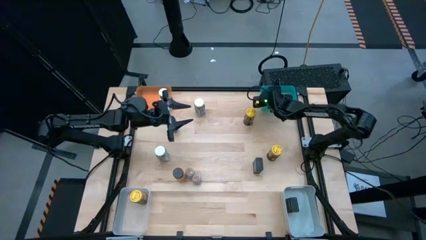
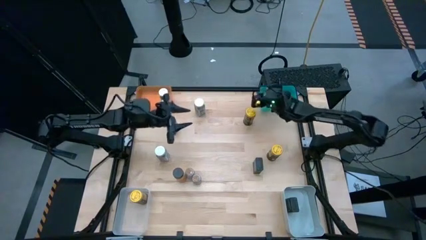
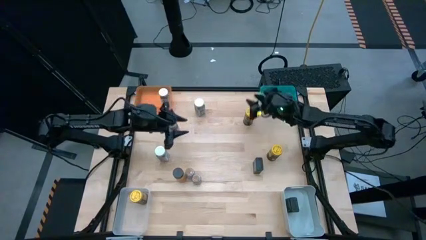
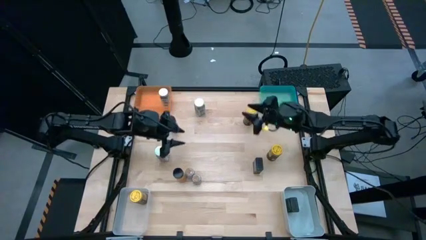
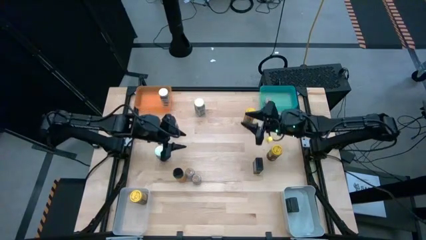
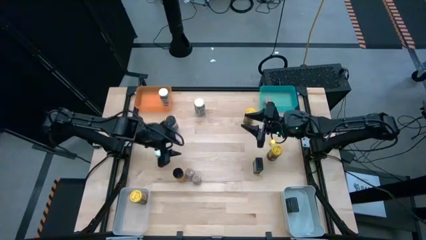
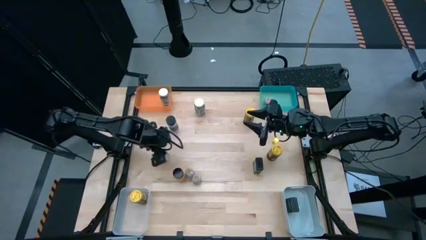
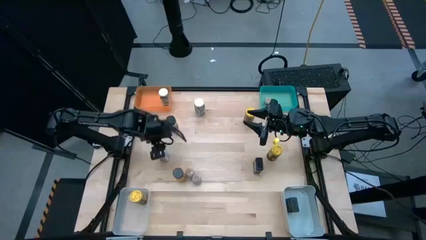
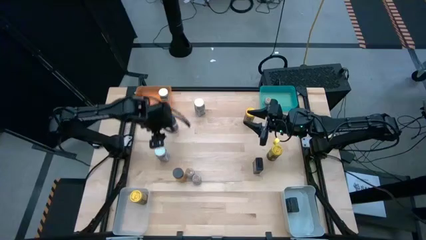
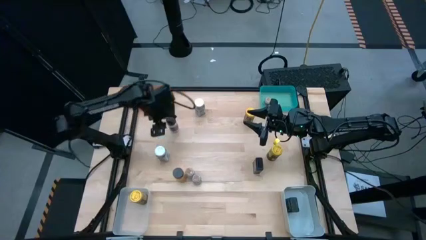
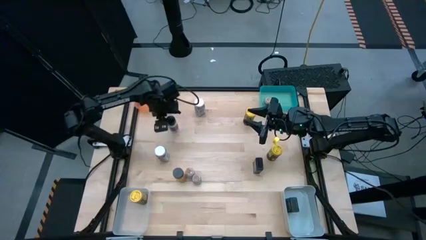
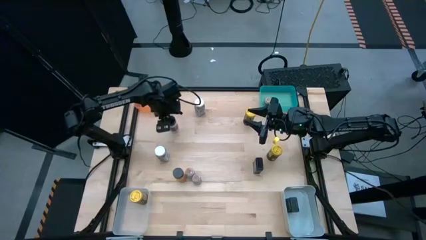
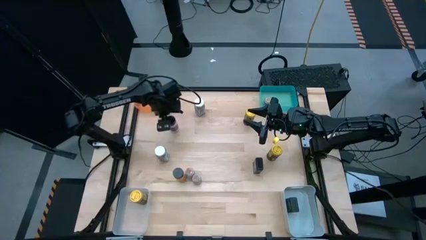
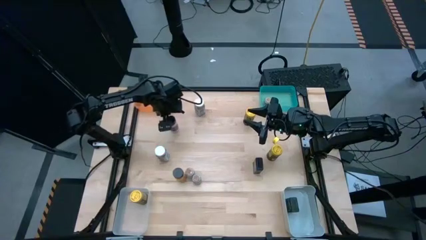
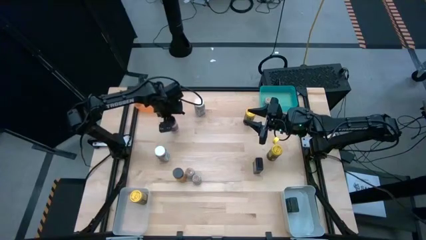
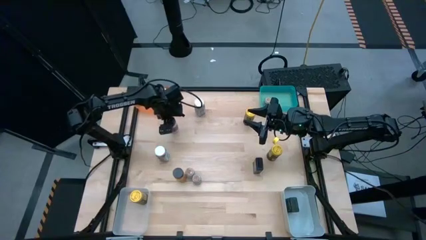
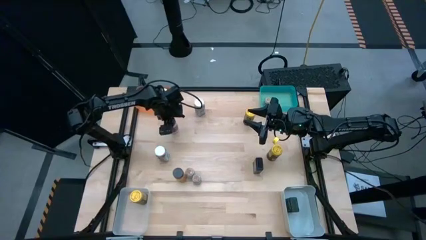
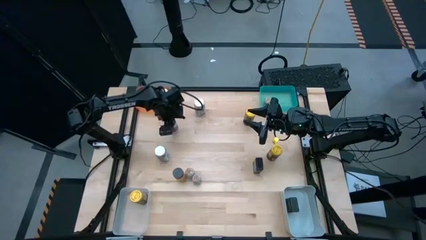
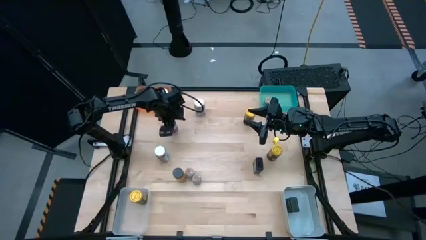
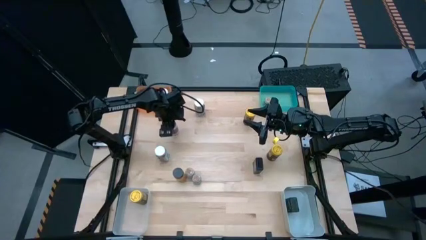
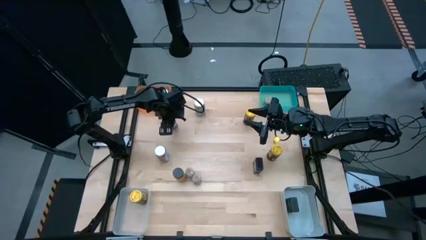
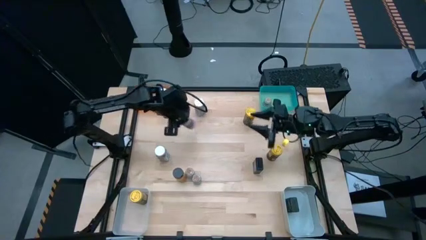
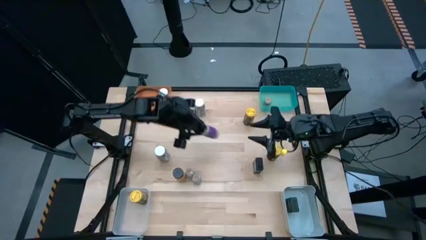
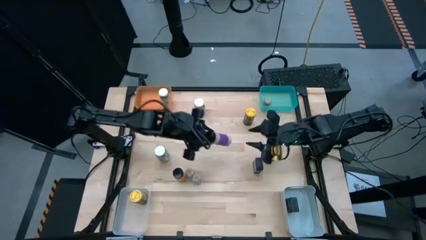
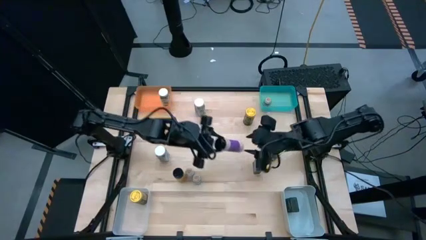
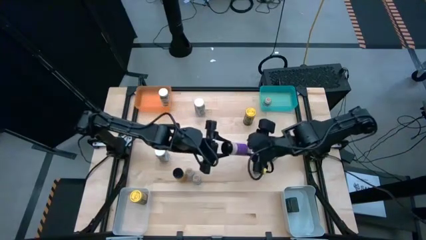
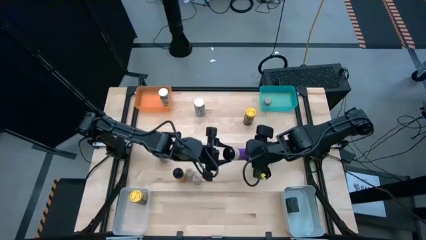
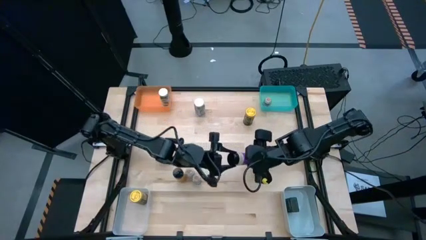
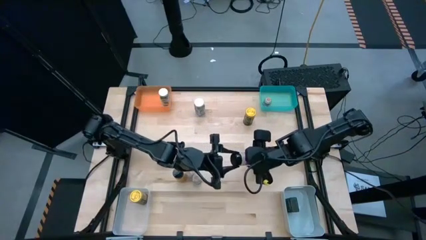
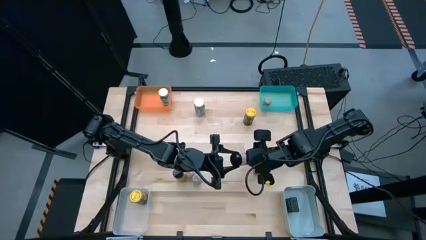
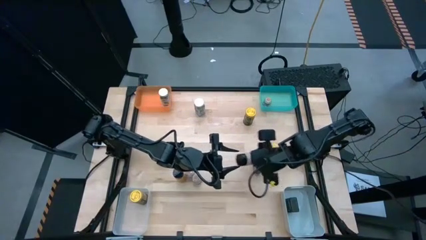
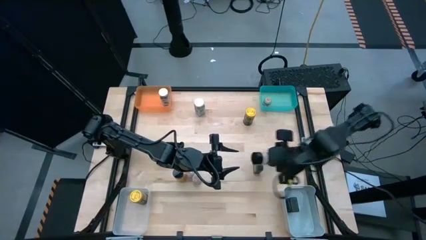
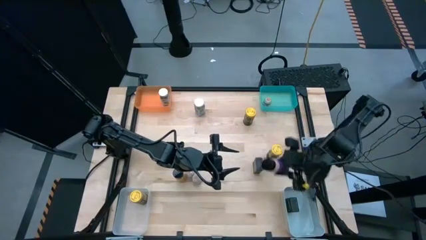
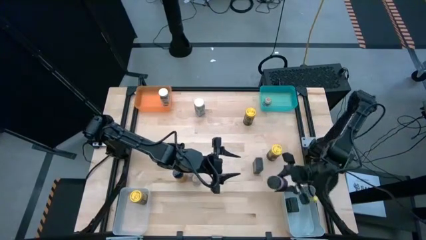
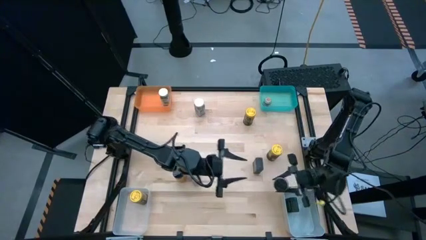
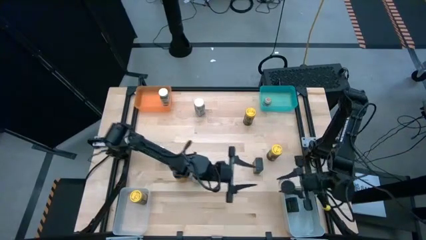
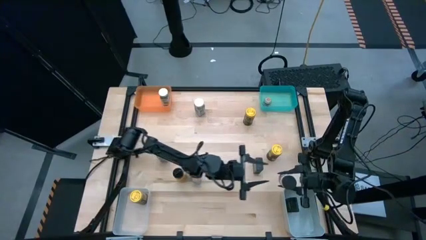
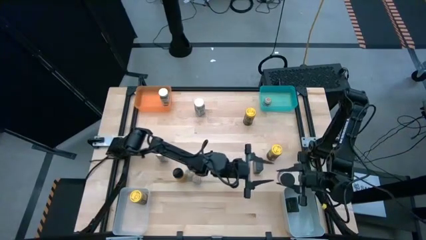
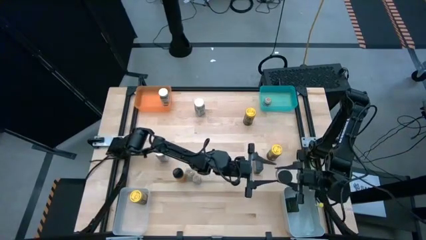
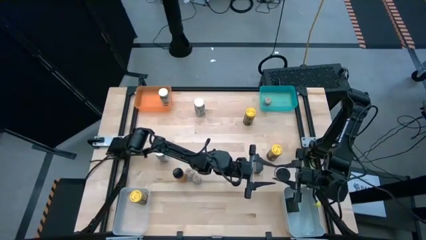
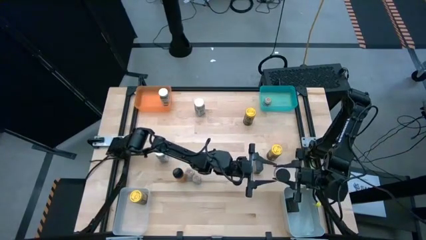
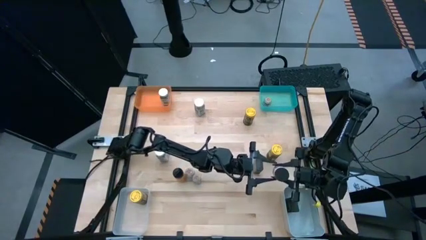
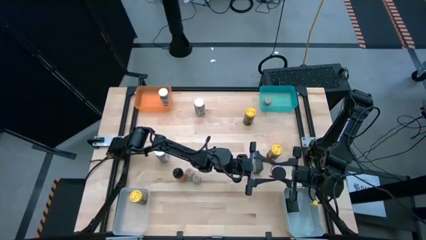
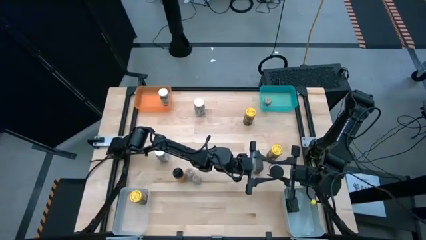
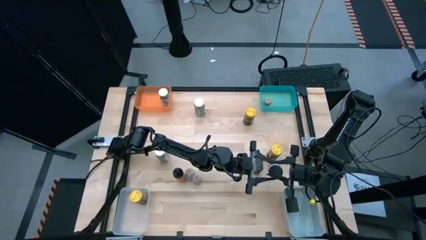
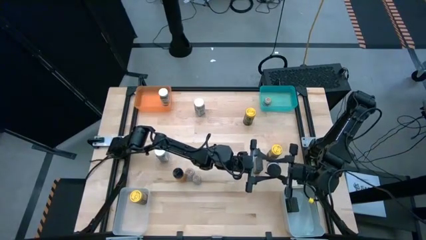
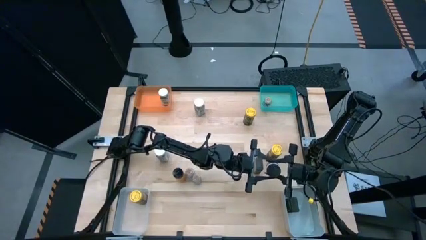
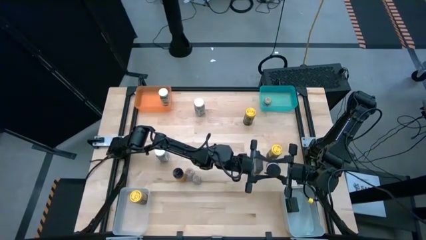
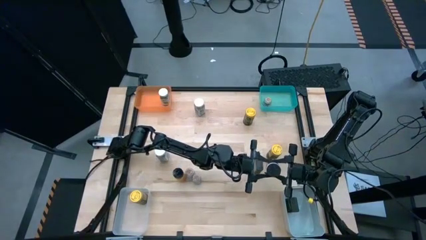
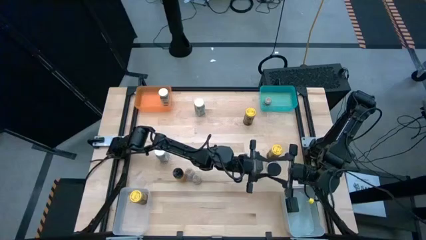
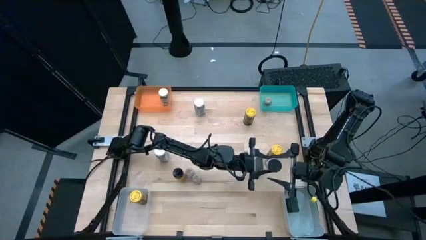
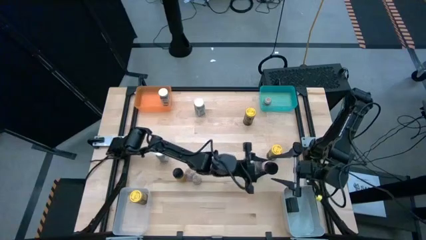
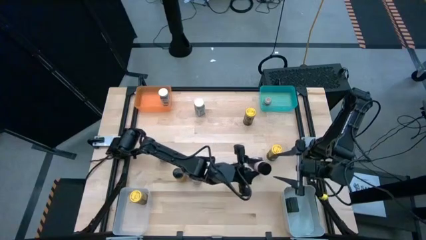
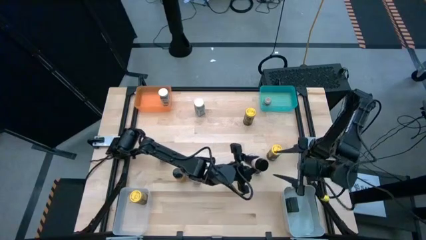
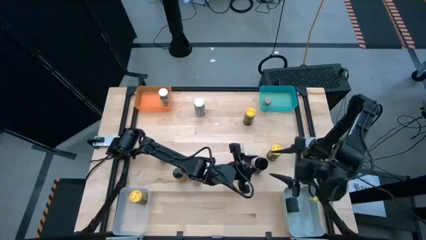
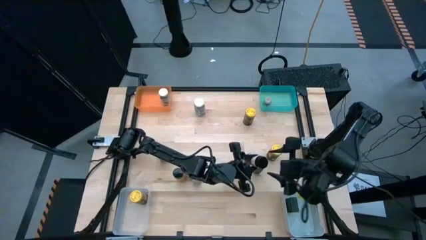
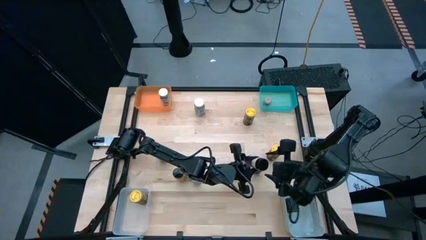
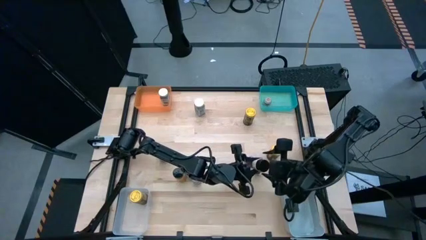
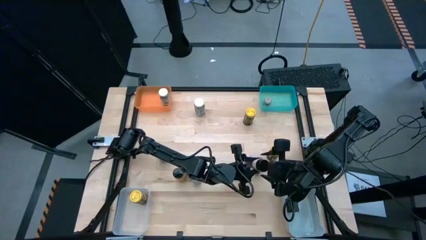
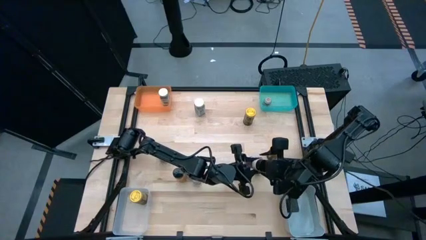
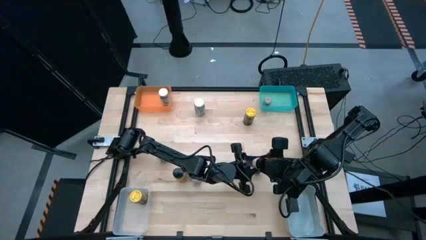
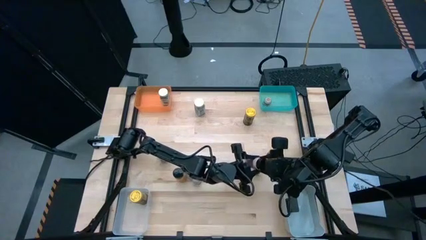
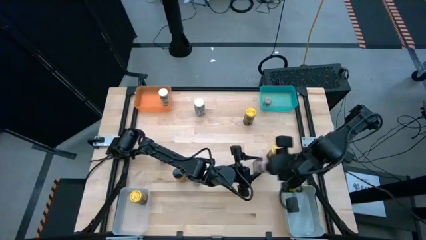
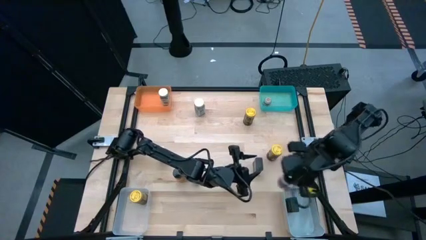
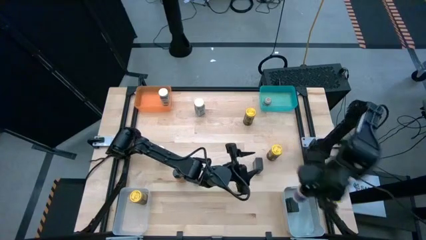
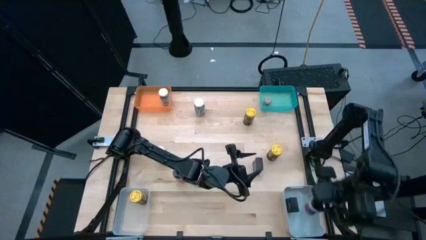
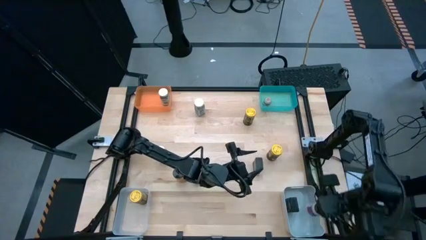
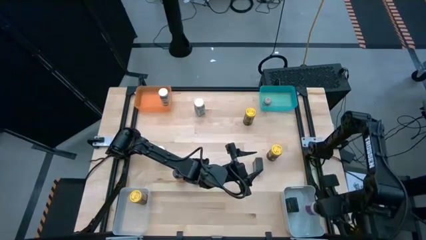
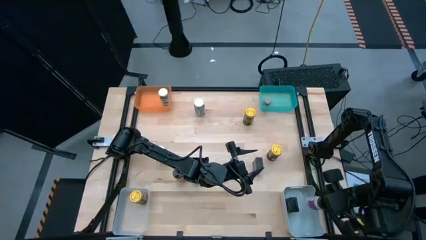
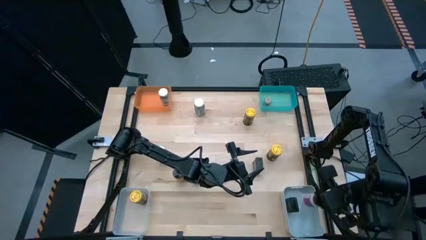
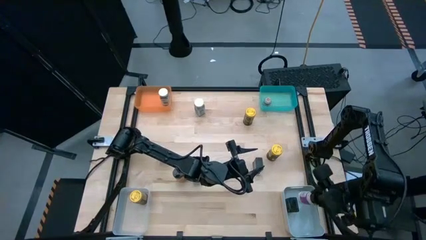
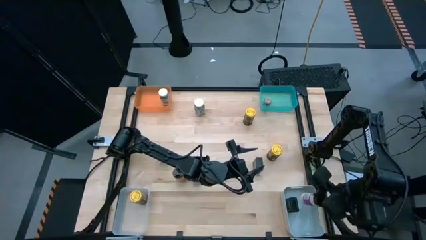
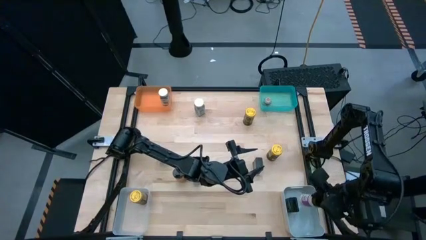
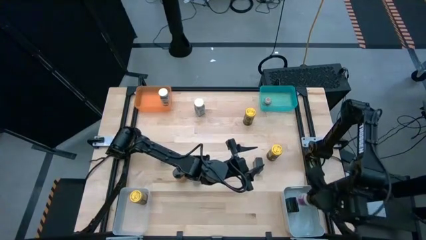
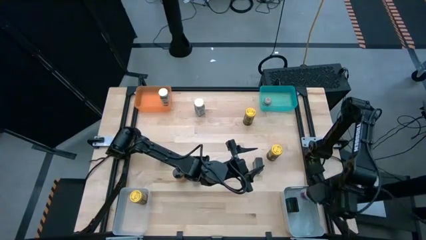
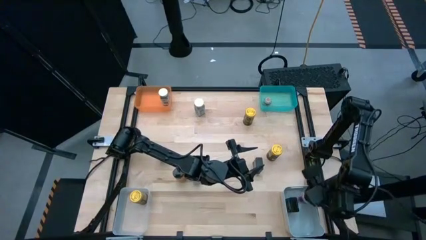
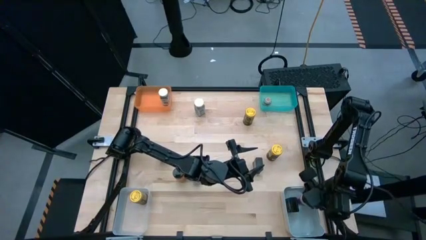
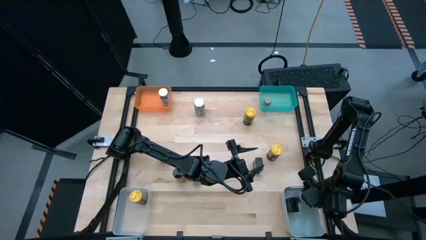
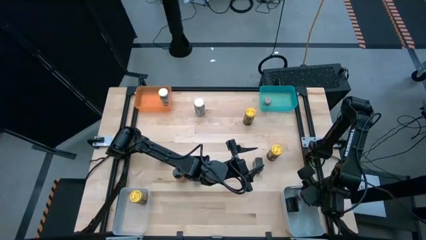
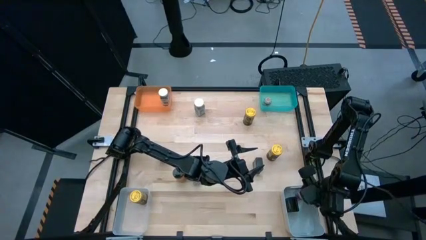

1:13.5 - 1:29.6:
Task: Sort spices by type
Put the top black seasoning bottle into the gray bin
